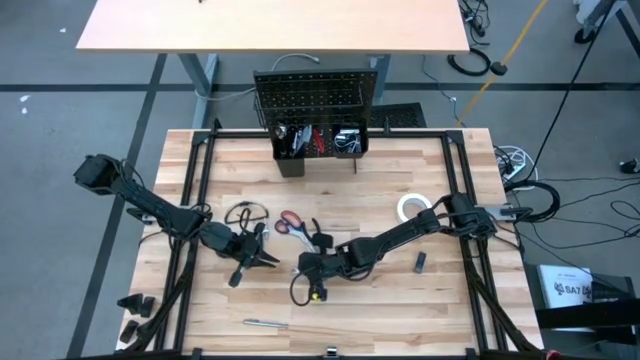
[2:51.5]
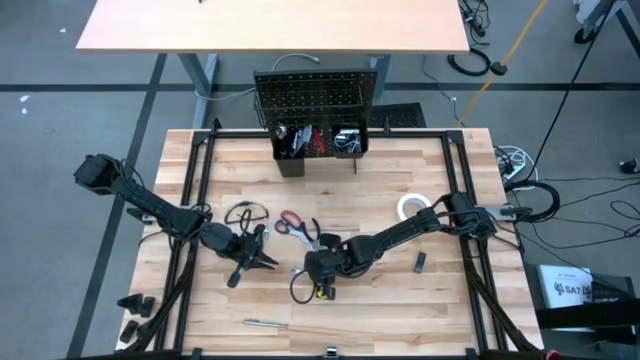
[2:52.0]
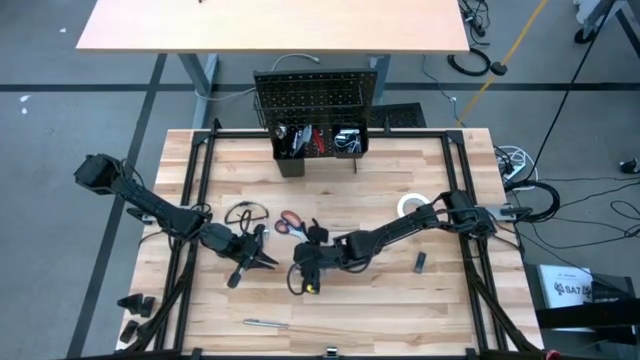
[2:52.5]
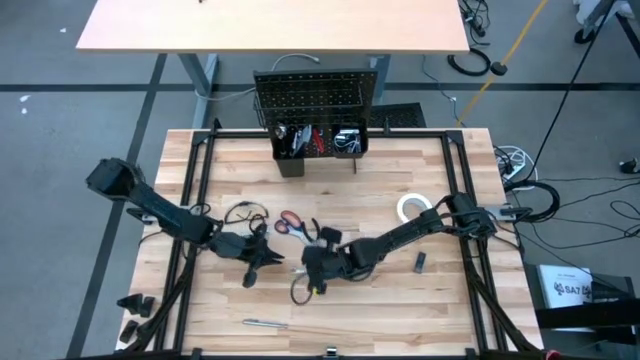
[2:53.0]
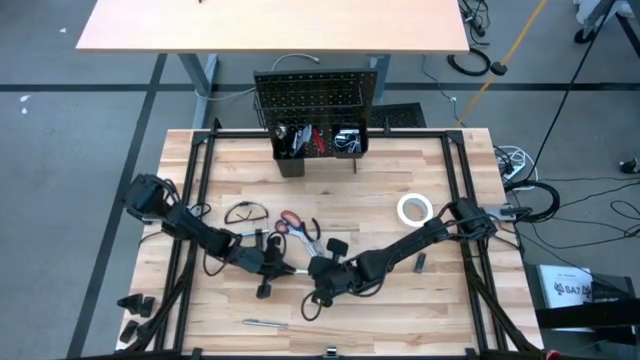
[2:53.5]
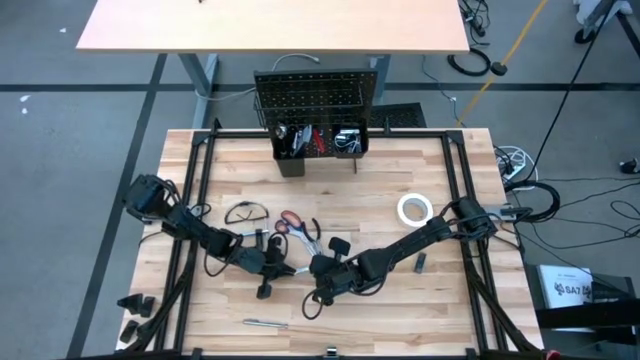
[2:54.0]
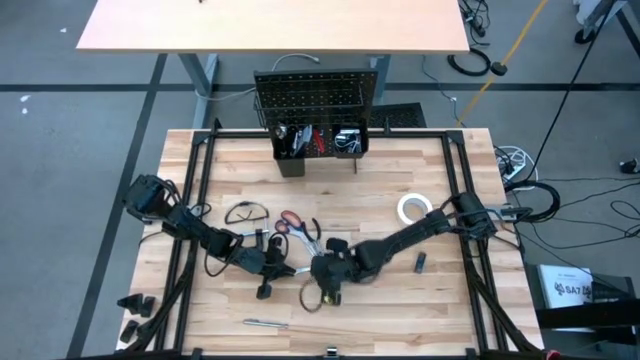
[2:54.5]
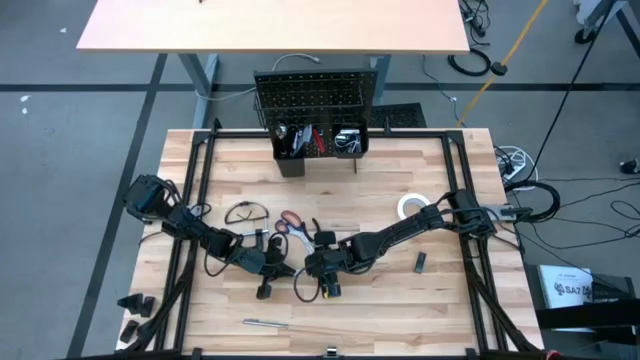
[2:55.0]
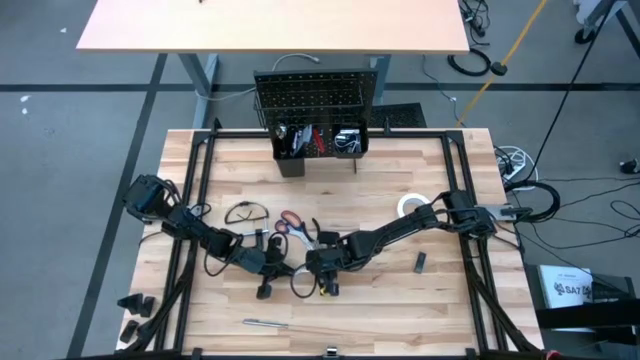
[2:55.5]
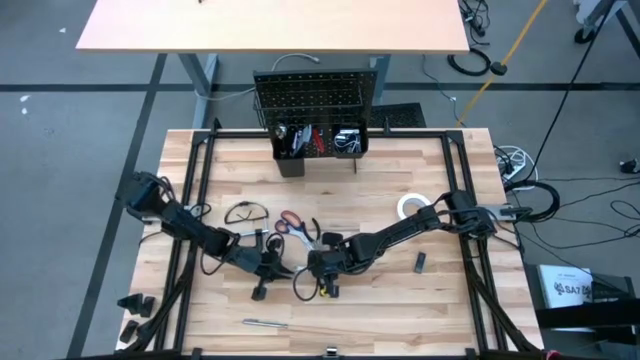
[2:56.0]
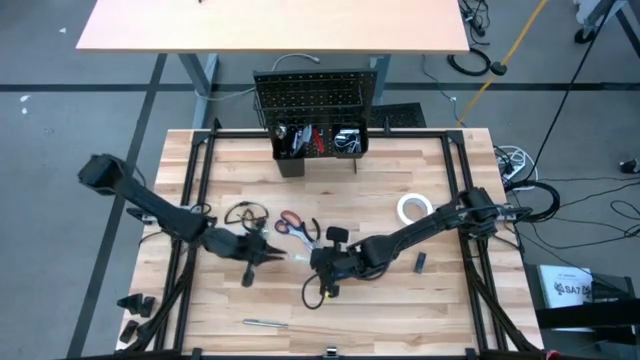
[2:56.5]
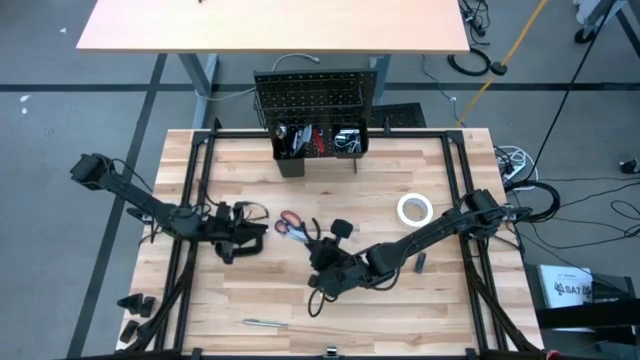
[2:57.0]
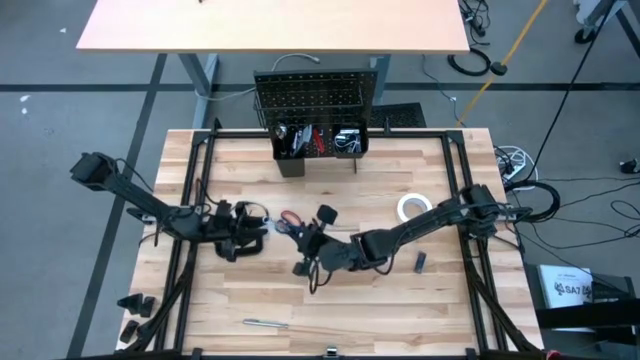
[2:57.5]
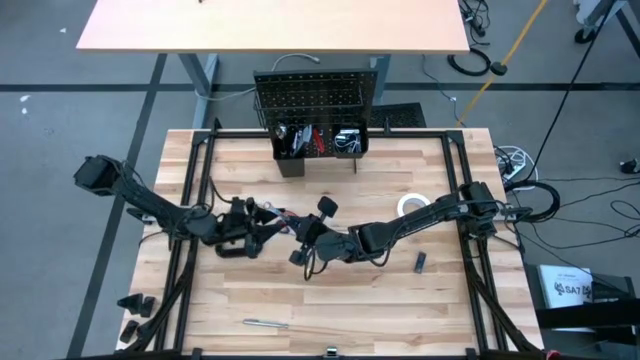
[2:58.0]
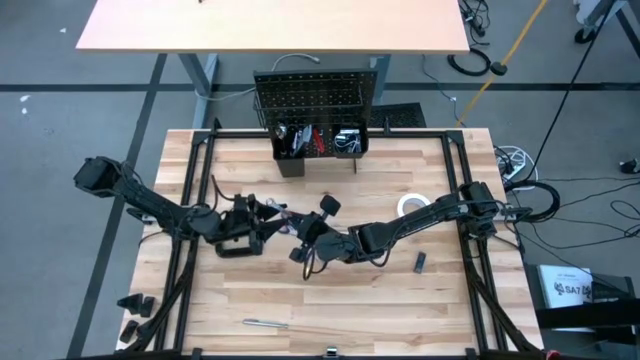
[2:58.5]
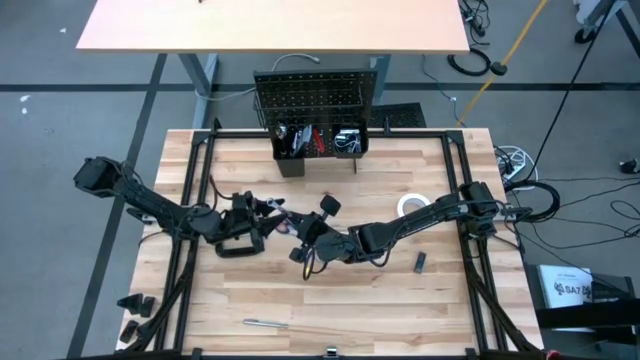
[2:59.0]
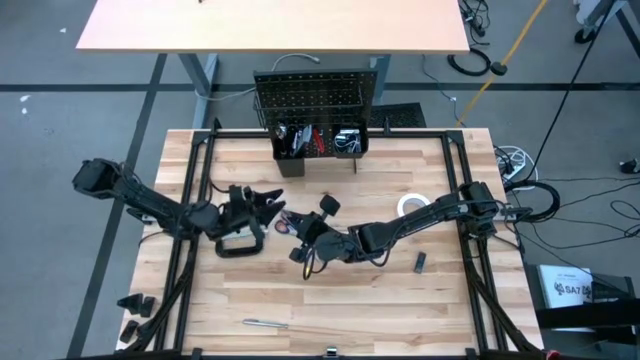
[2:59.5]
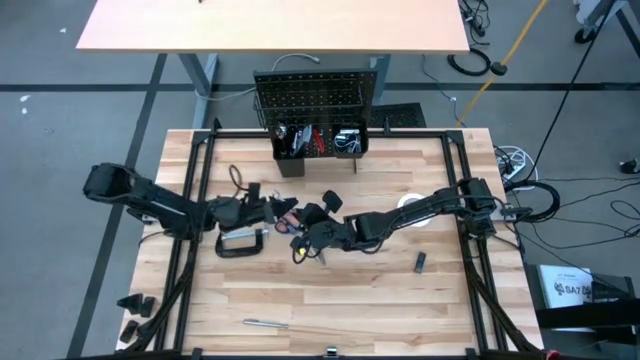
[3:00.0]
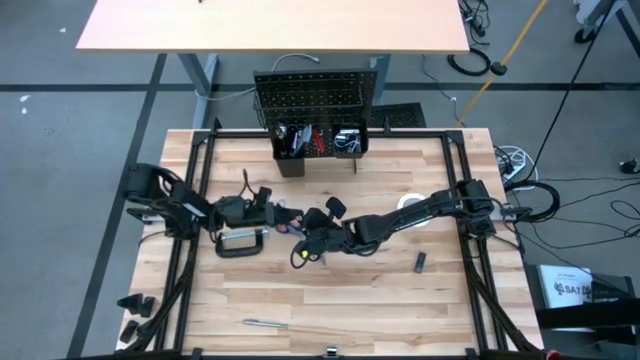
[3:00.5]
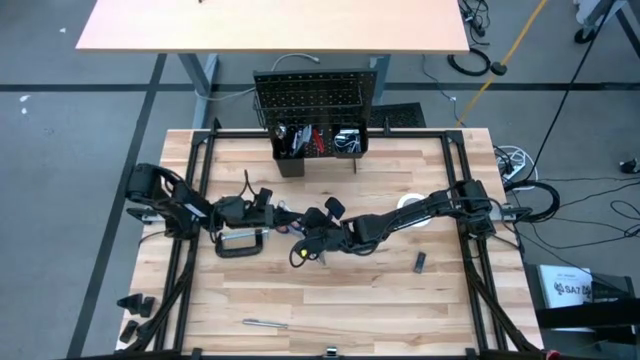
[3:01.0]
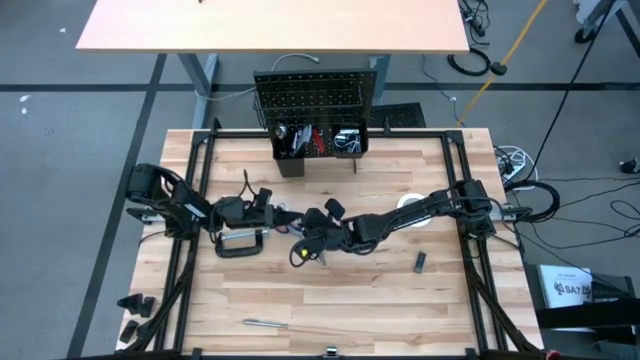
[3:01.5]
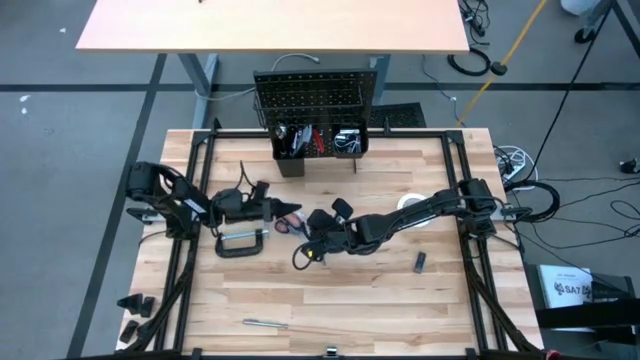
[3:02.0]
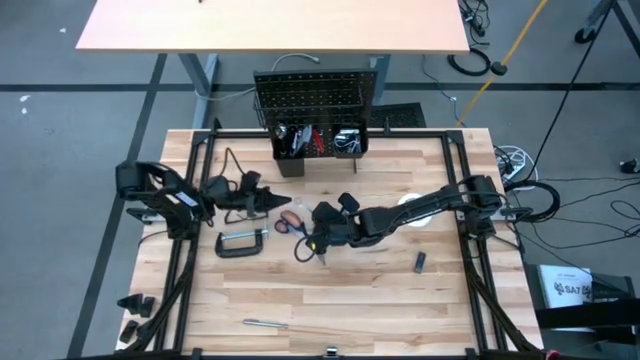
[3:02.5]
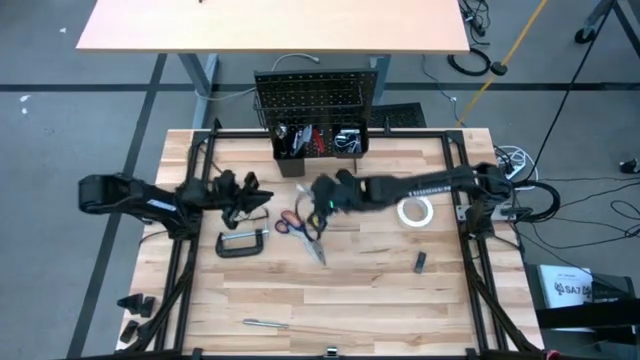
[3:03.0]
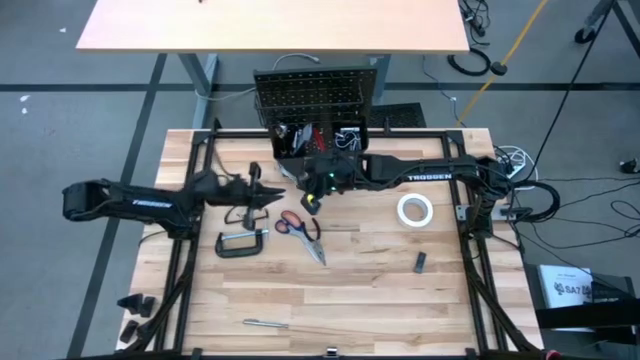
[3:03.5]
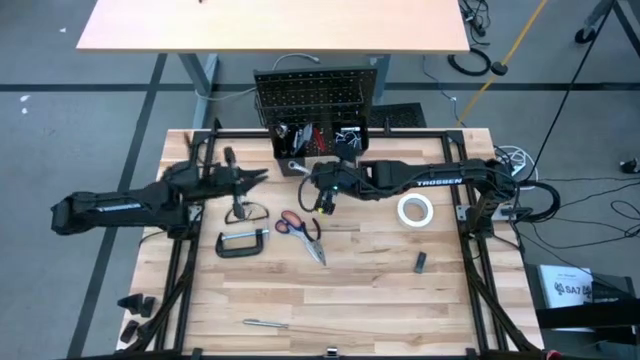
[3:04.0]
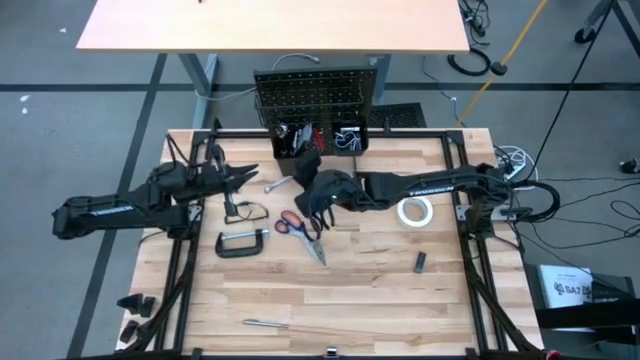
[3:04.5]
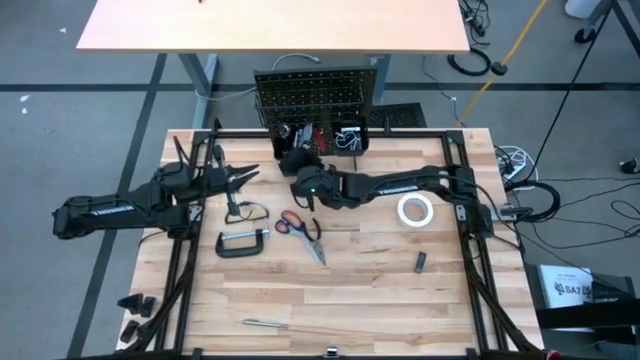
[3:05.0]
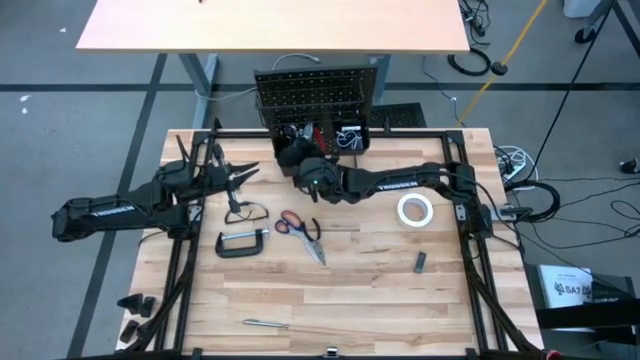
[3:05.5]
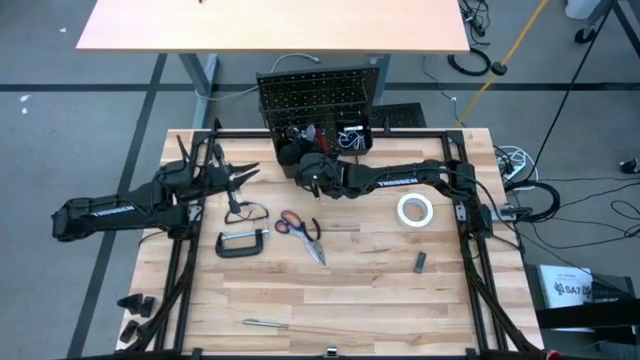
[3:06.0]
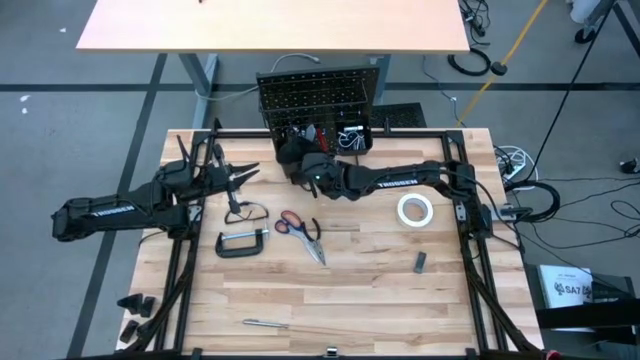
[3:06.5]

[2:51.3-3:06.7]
Task: Hang tools onto peg board
Put the wrench on the left black bin on the peg board

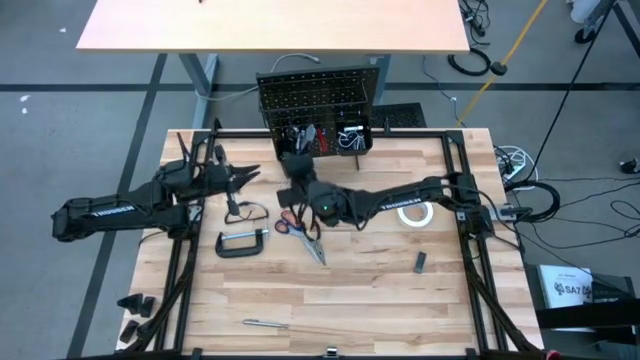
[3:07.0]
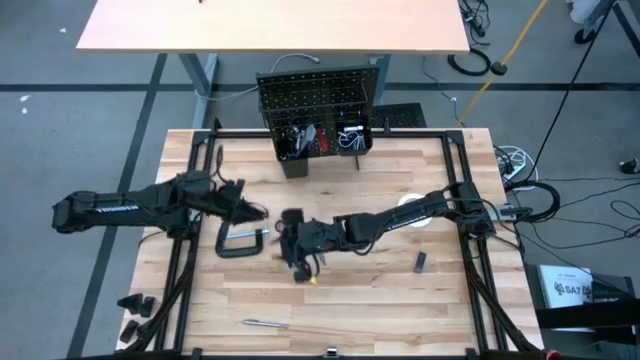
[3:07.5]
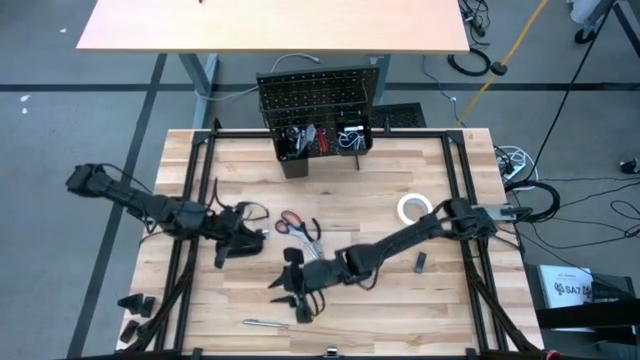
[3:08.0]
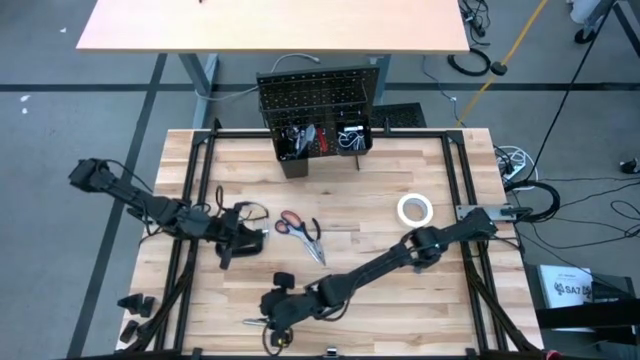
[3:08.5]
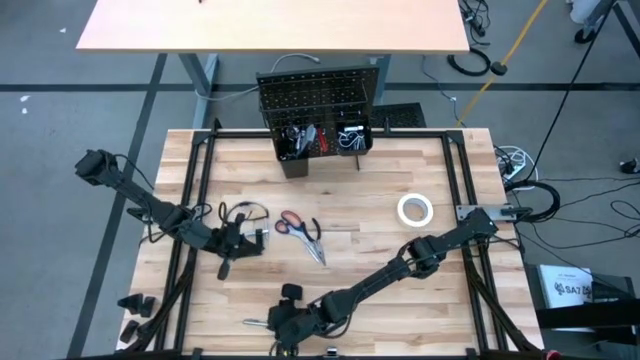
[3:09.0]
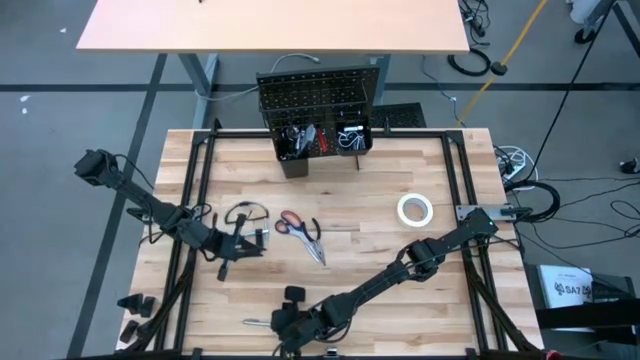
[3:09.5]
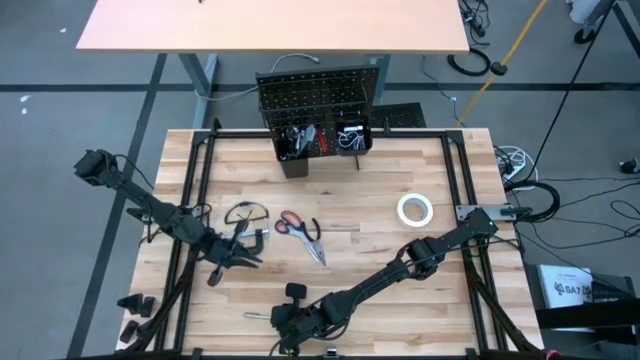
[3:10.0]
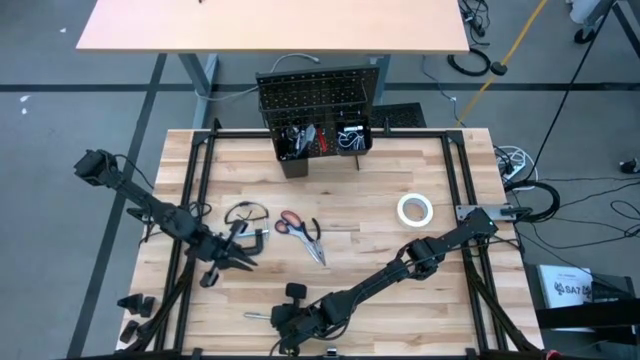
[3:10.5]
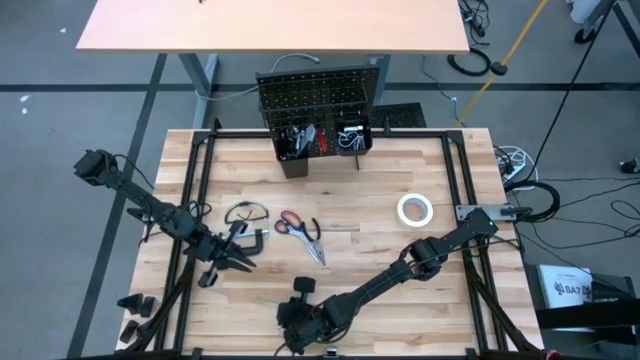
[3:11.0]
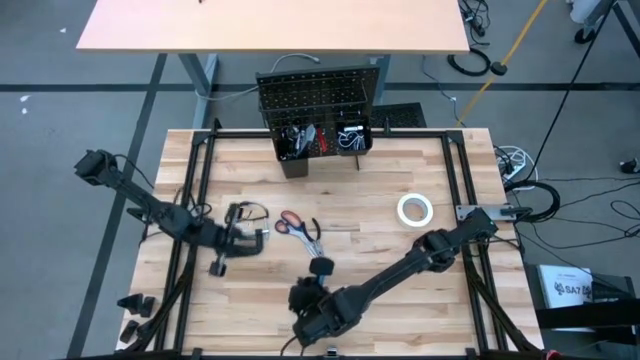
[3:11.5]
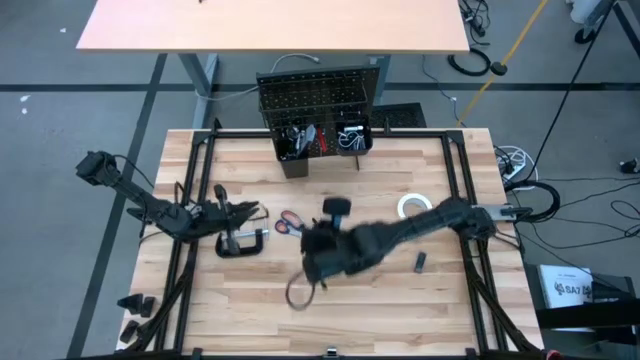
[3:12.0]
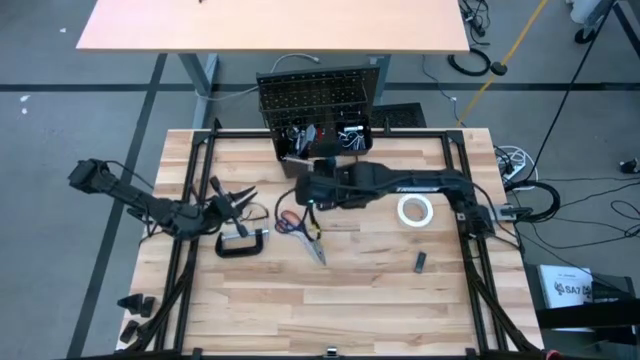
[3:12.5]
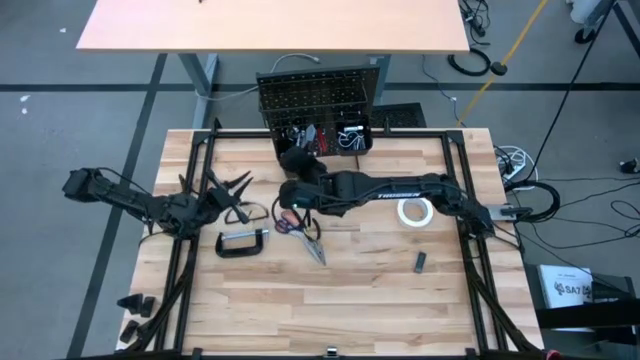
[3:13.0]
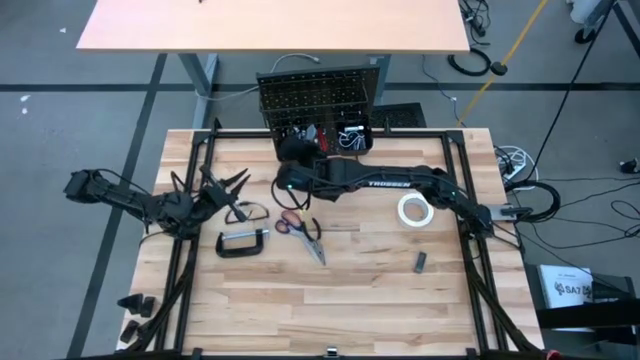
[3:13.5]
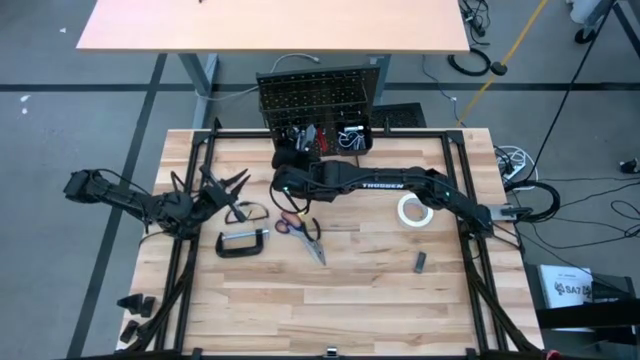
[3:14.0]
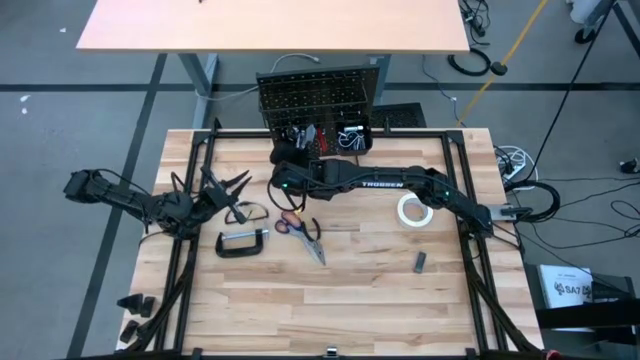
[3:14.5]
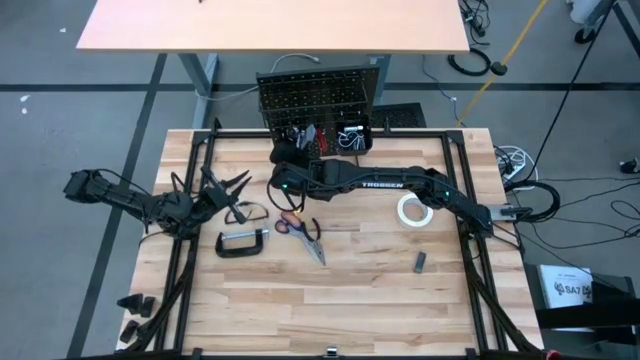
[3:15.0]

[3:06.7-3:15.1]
Put the pen on the left black bin on the peg board
